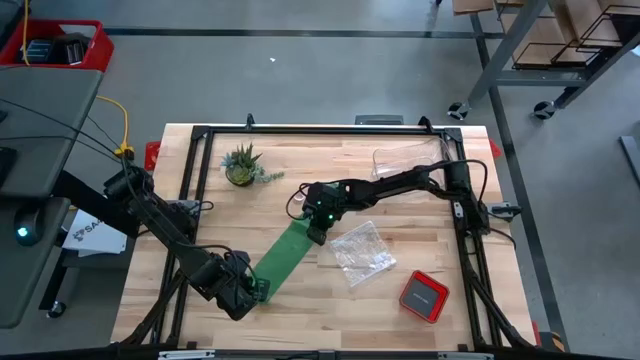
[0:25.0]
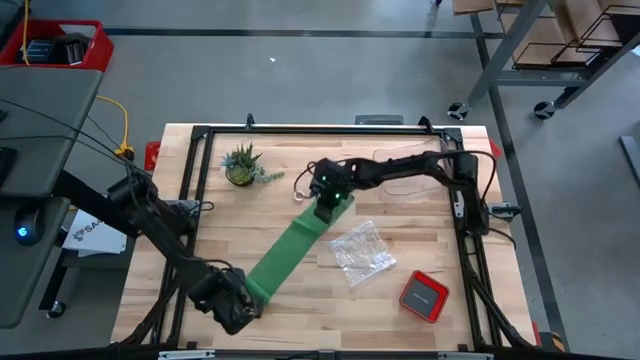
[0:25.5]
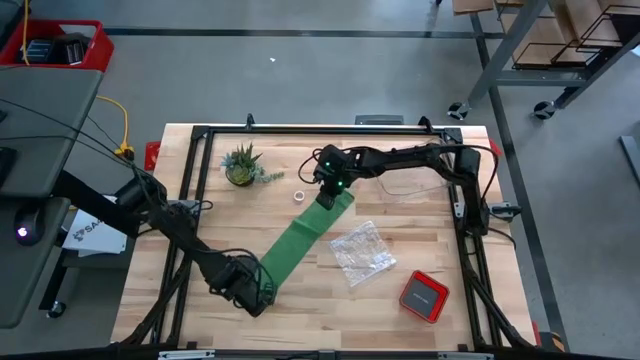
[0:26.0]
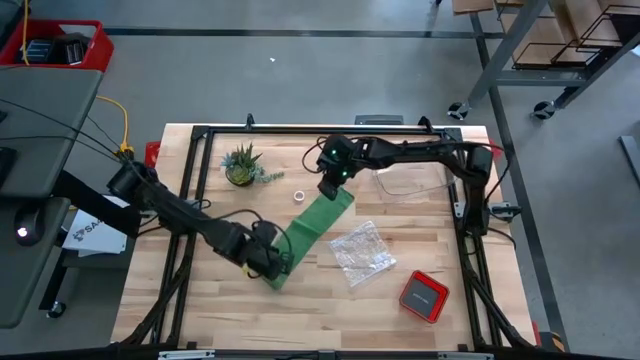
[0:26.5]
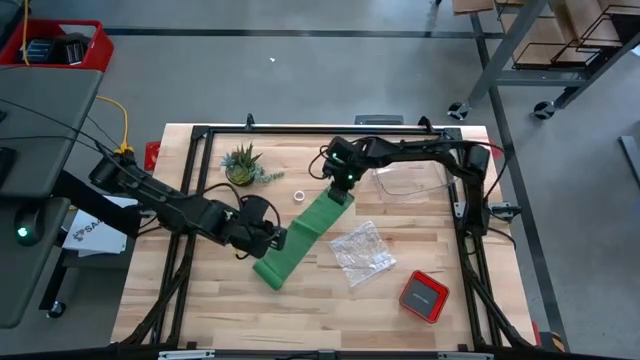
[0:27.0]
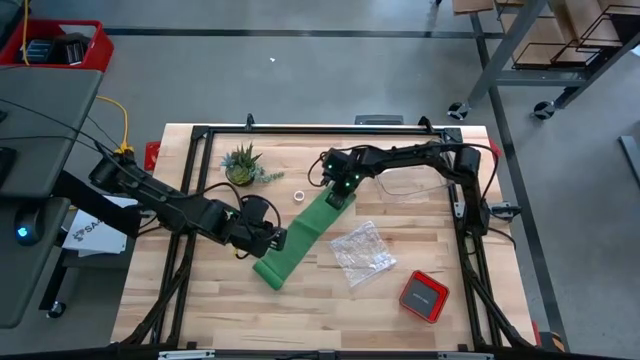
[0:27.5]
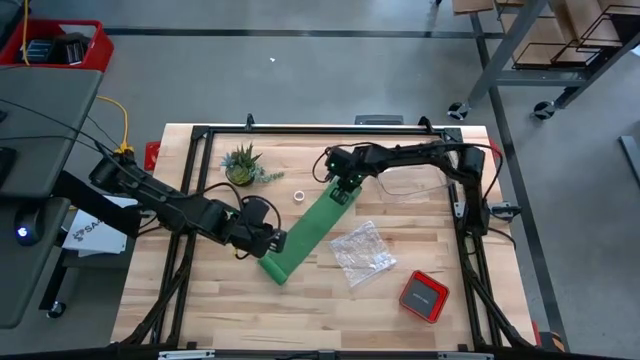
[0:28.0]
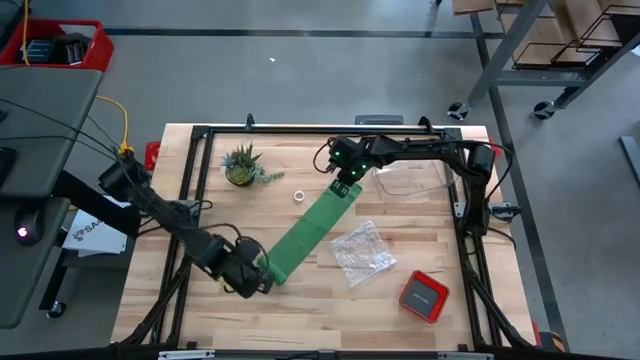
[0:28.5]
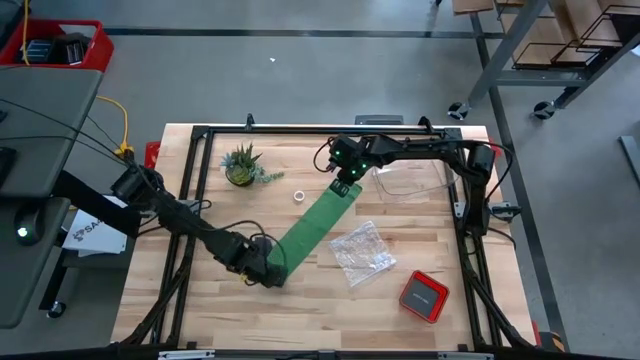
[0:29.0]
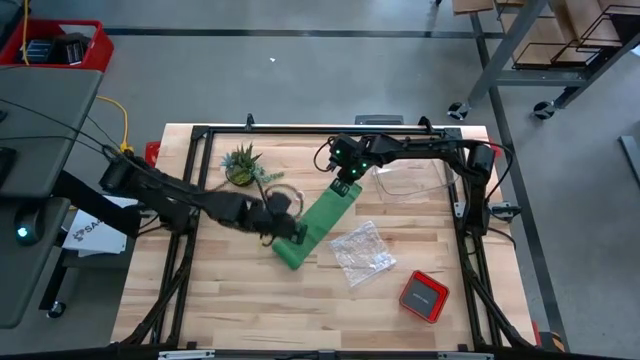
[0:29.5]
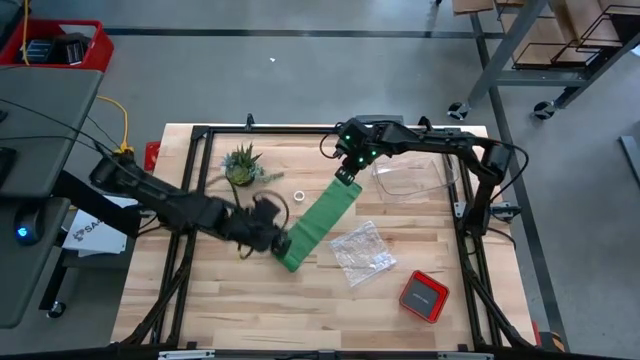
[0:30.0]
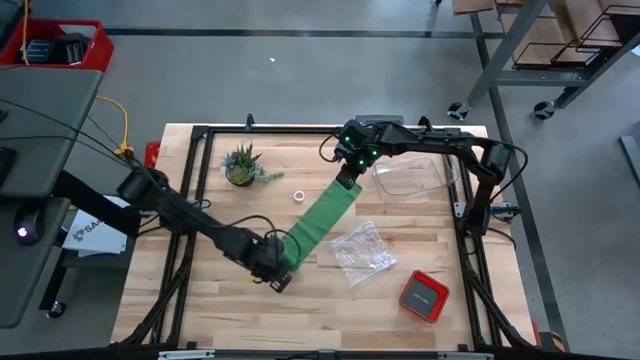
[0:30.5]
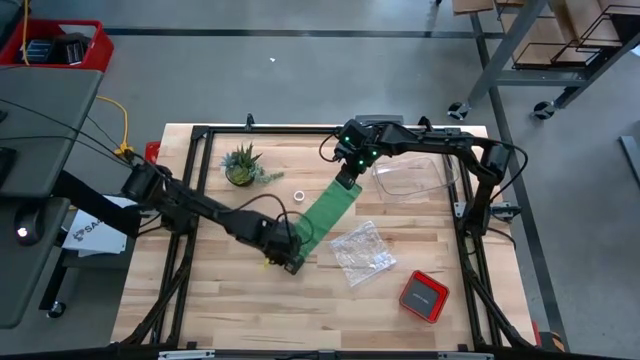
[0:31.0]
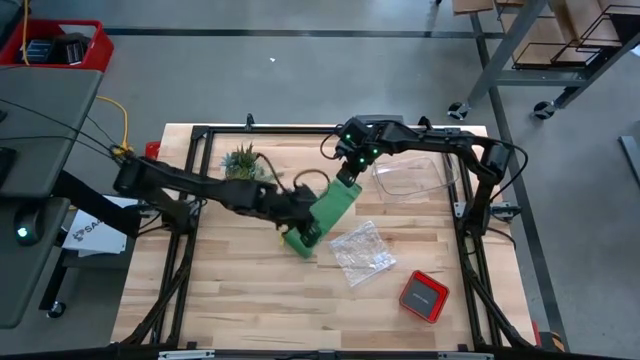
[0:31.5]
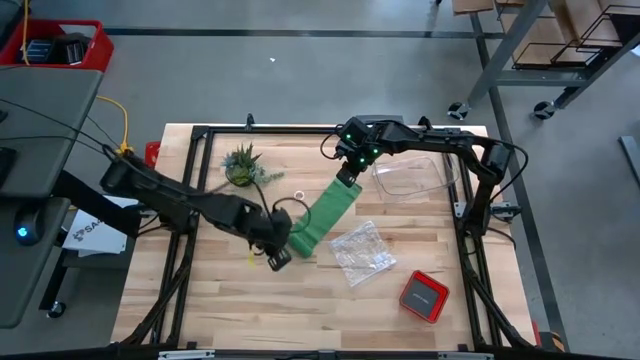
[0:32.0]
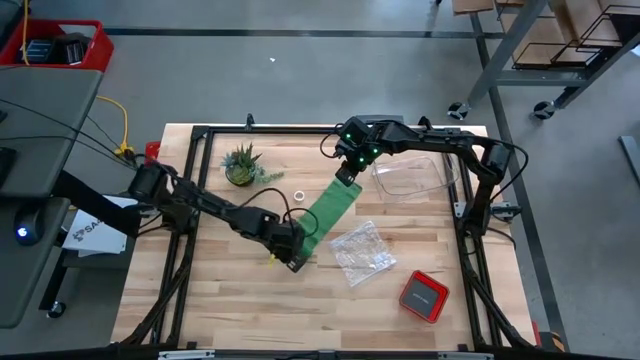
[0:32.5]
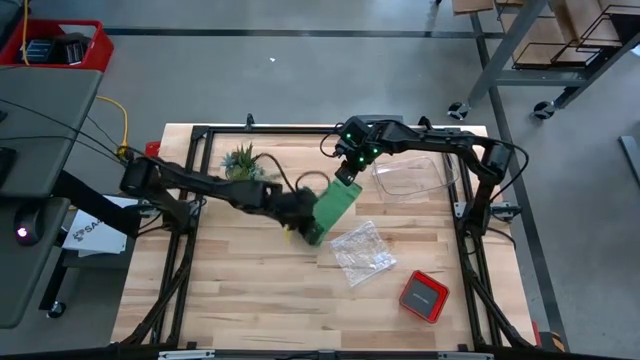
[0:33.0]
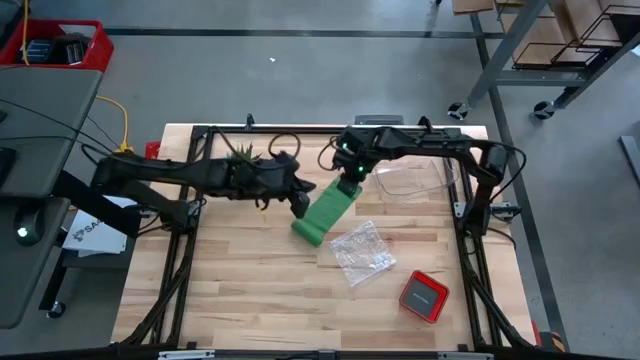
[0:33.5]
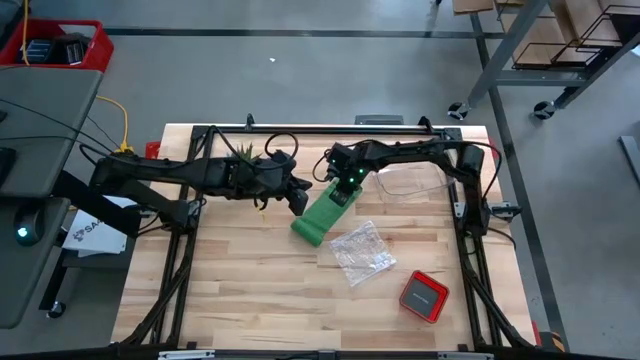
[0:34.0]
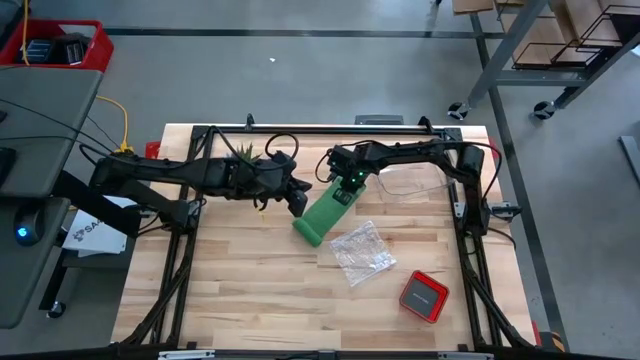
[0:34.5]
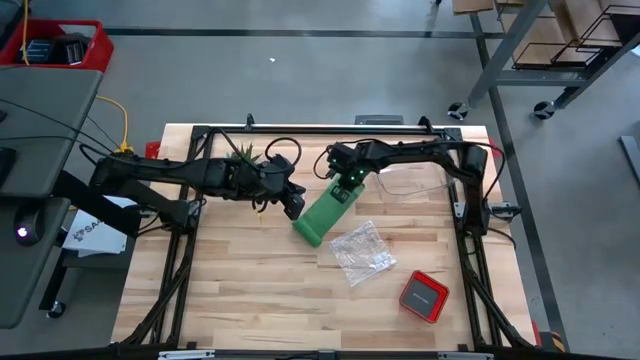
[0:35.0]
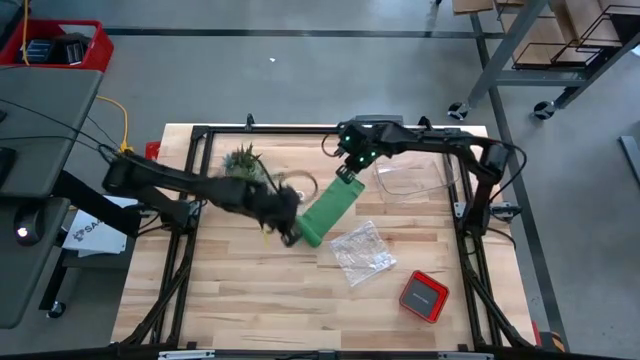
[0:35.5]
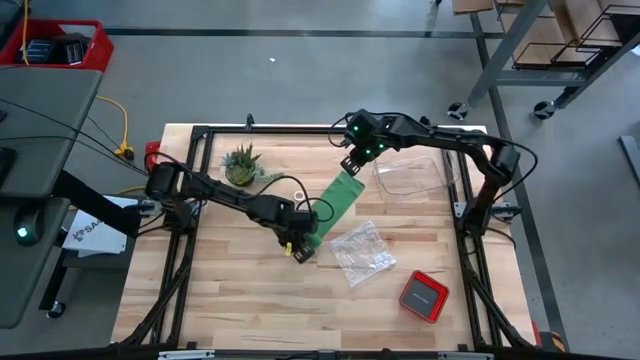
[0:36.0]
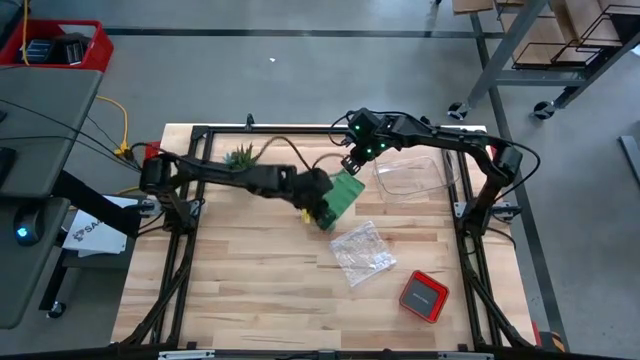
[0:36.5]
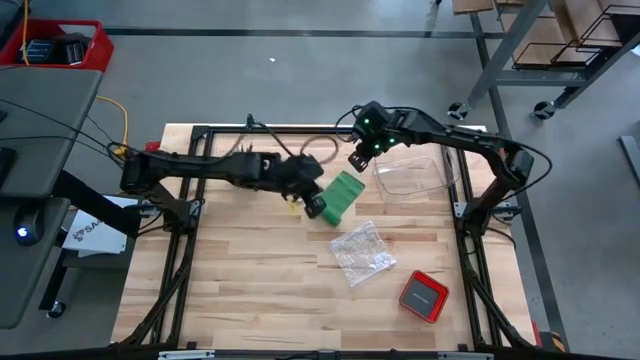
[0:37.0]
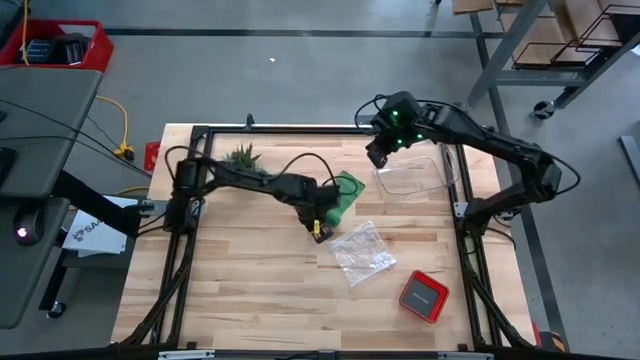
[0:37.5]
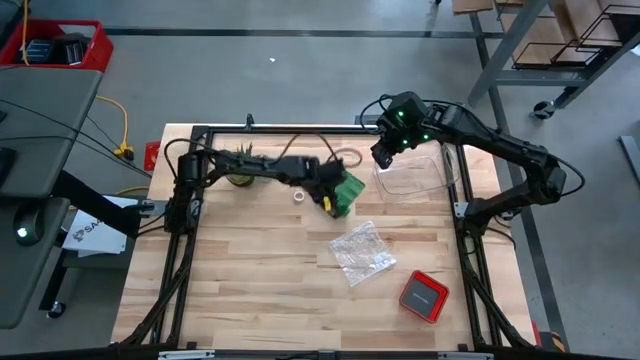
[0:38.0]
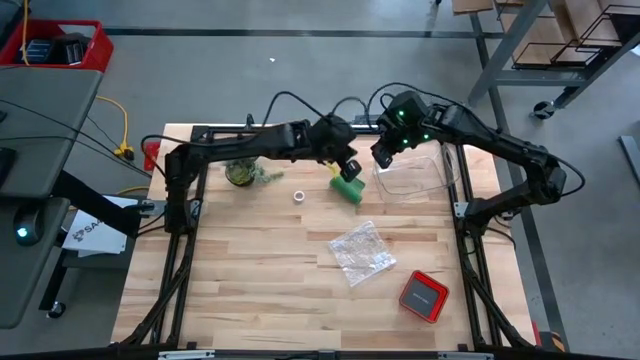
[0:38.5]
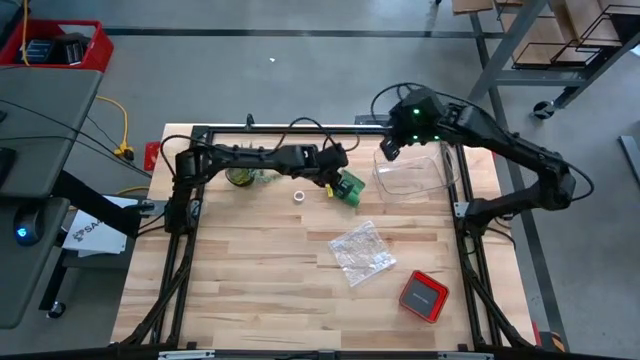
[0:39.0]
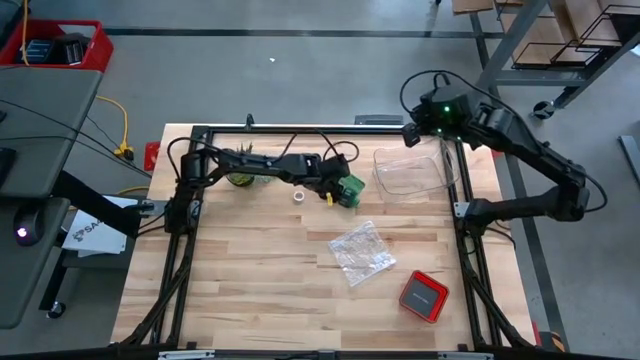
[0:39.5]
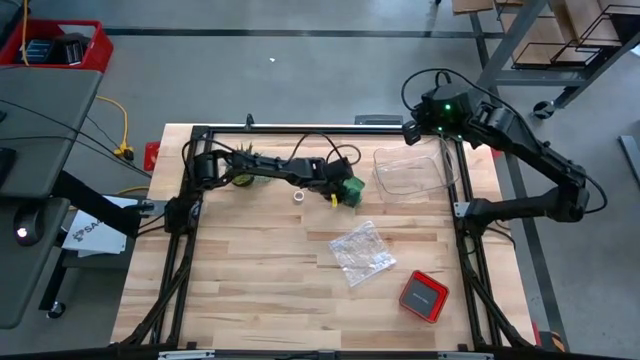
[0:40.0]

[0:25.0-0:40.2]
Task: Roll bandage
Roll the green bandage

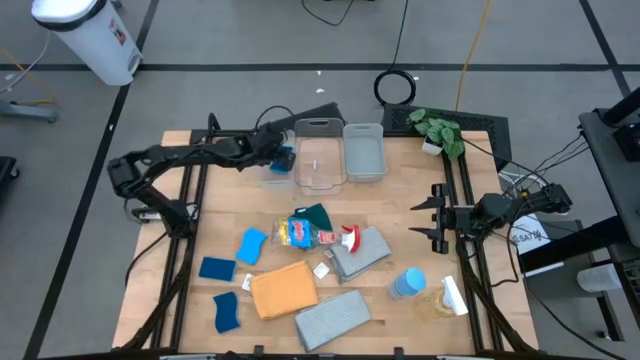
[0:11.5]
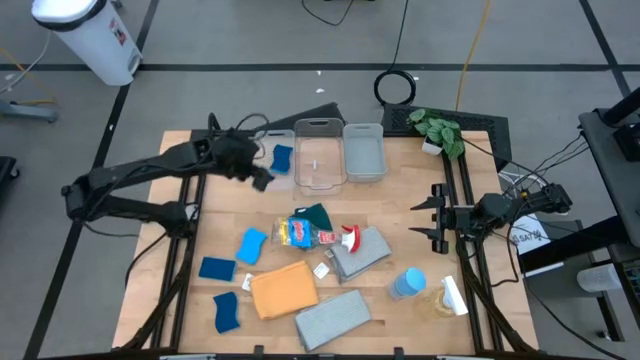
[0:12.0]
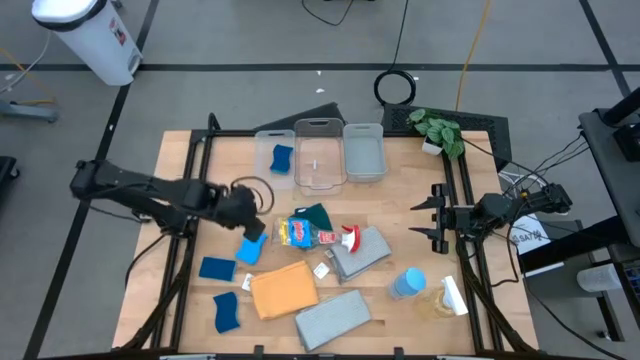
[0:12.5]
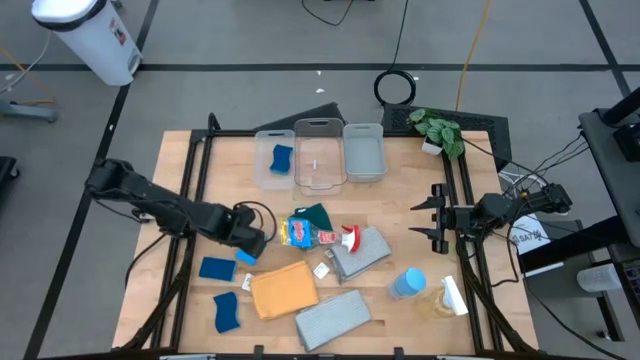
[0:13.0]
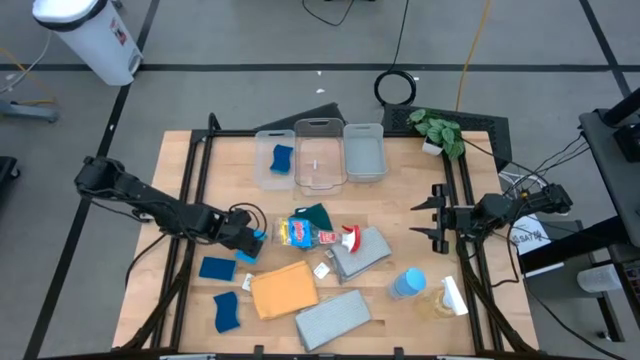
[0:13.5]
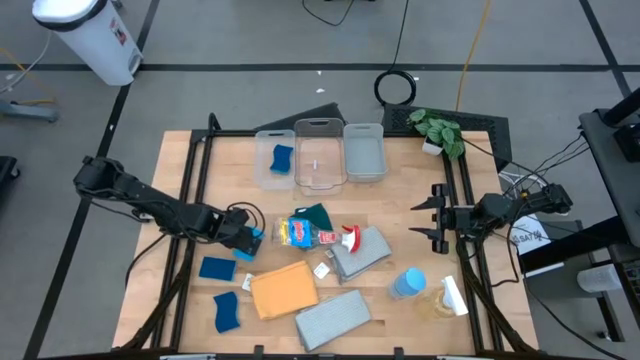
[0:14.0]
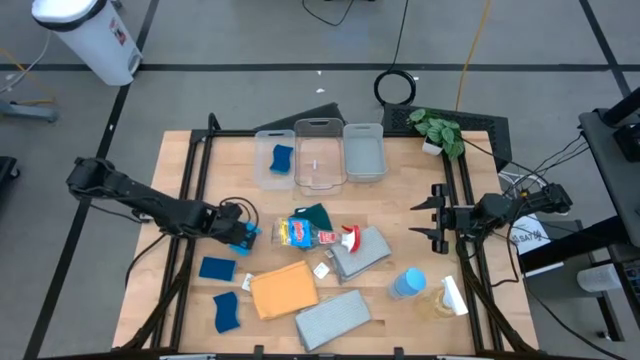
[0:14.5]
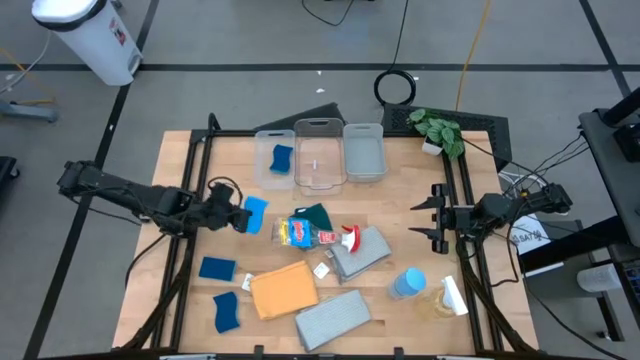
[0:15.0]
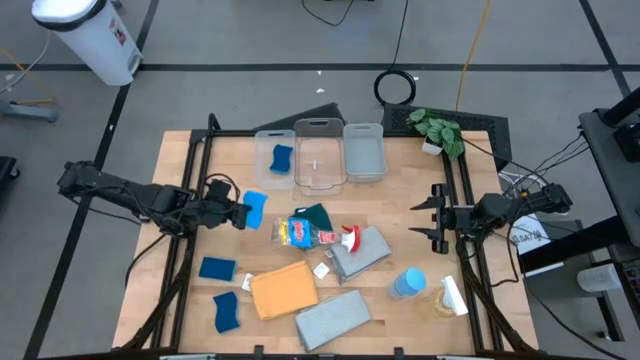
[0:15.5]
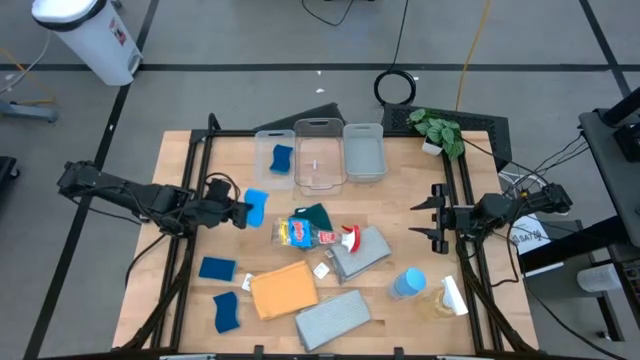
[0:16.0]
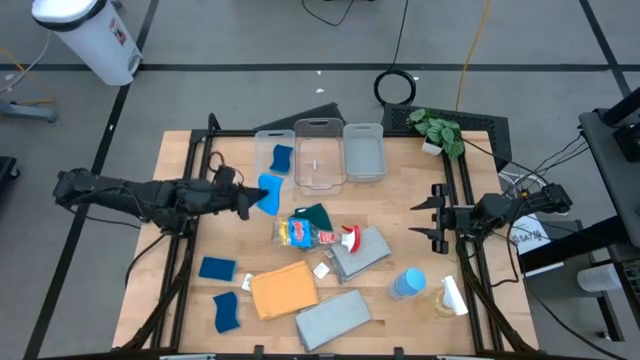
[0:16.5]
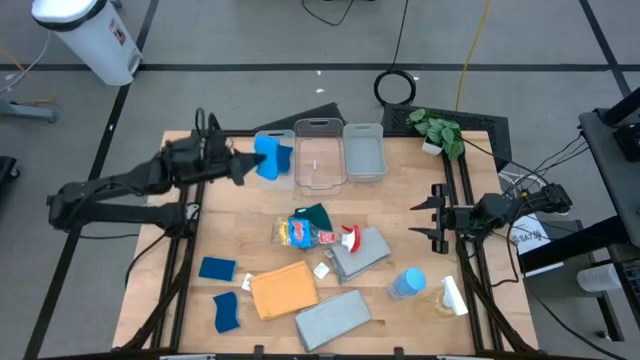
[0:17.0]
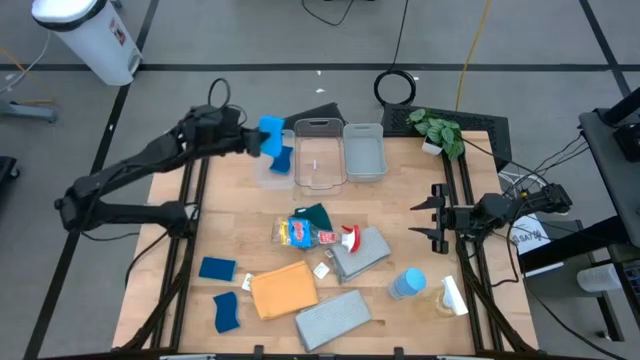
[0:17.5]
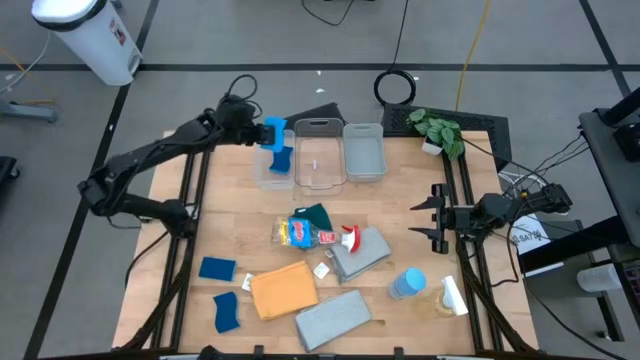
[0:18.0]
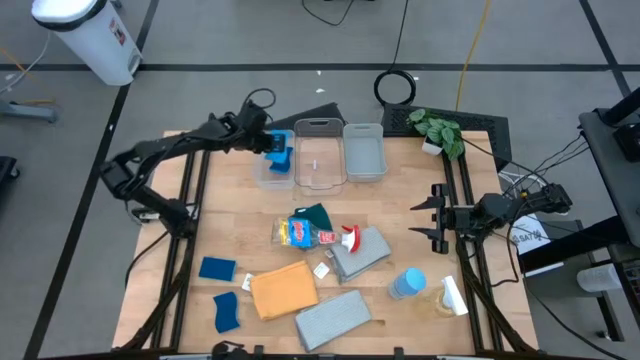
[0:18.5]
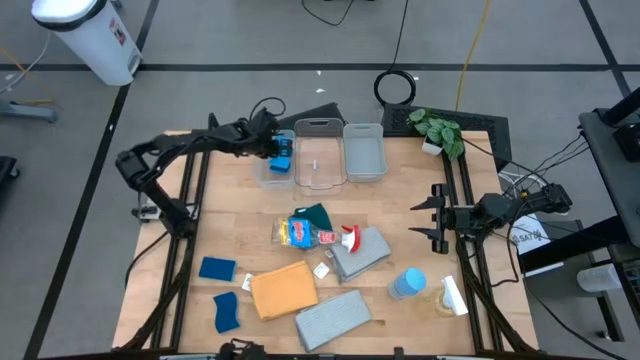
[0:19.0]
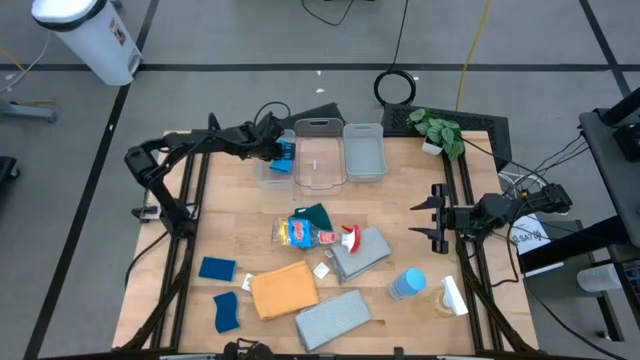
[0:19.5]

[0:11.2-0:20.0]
Task: Pick & Place Kitchen Items
Put the blue sponge into the white transparent bin
